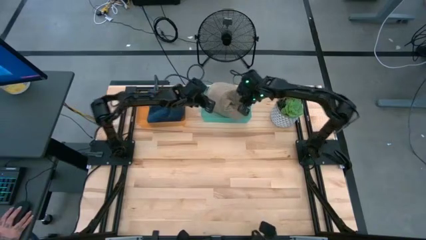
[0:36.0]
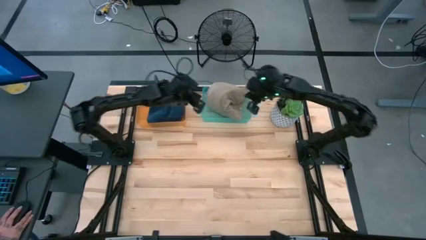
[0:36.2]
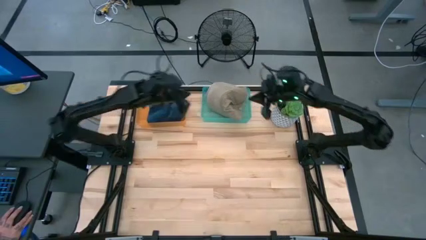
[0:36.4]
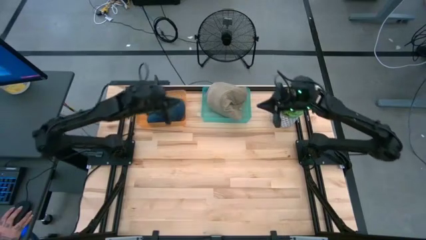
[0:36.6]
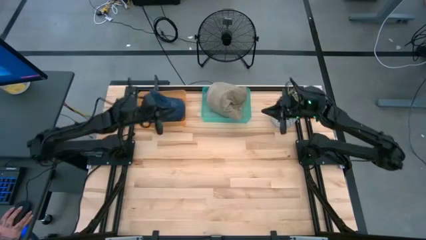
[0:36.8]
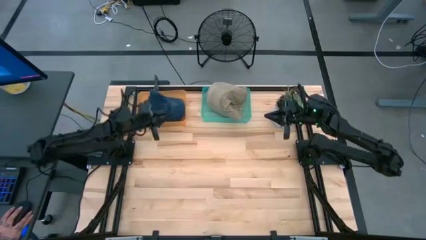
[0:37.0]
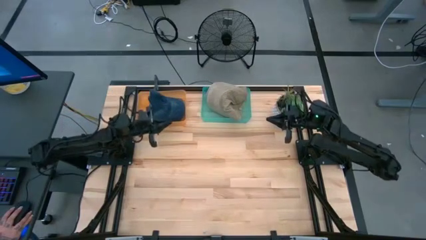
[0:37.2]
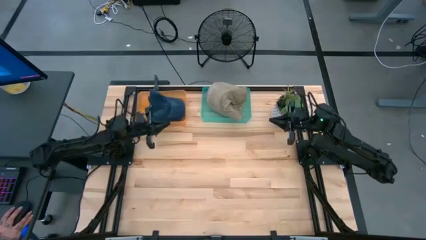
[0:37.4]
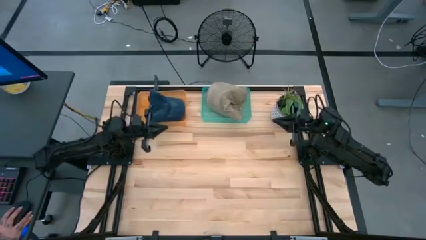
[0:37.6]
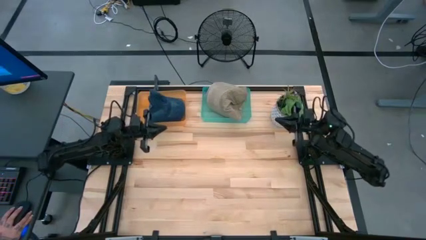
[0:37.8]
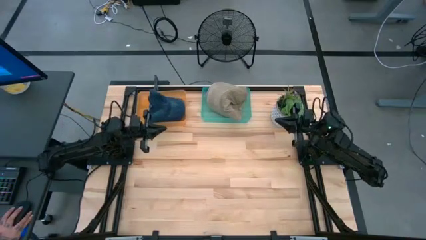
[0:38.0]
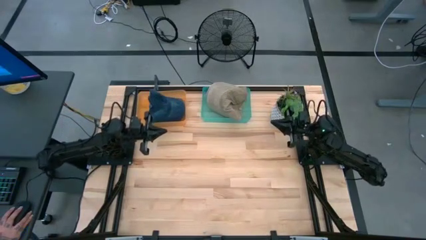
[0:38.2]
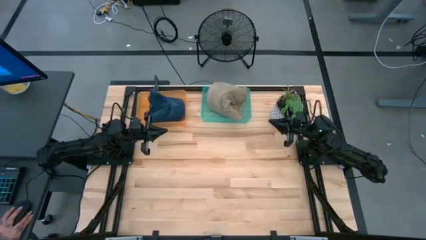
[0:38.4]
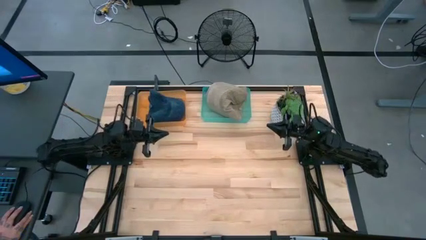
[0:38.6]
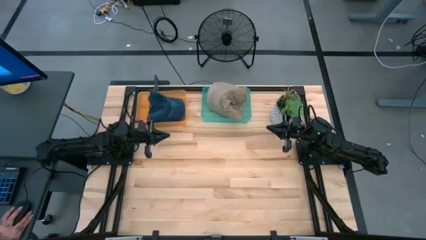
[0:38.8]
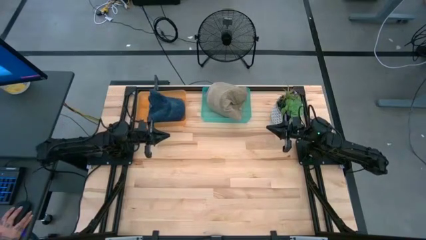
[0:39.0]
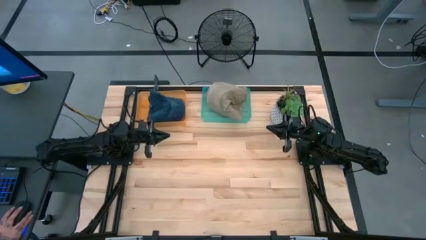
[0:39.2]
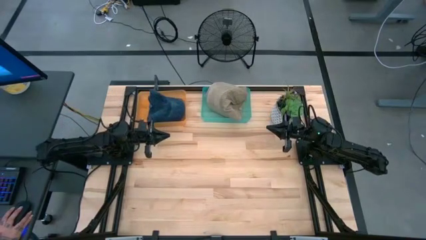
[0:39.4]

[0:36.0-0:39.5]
Task: Pick & Place hat
Return to Home Position

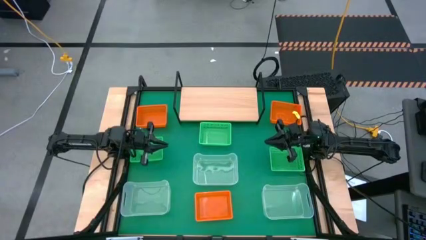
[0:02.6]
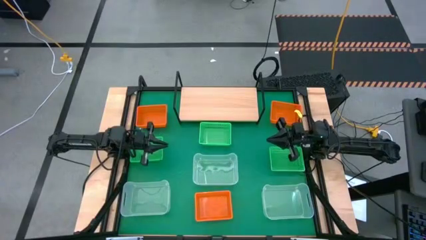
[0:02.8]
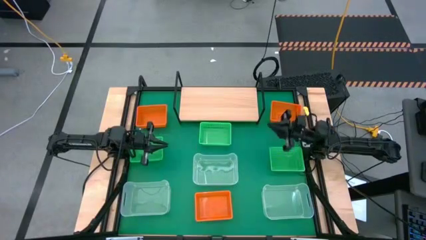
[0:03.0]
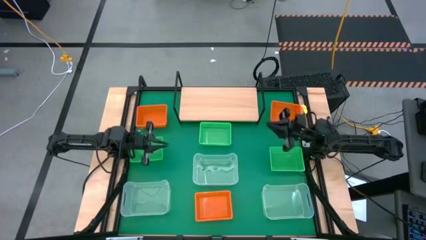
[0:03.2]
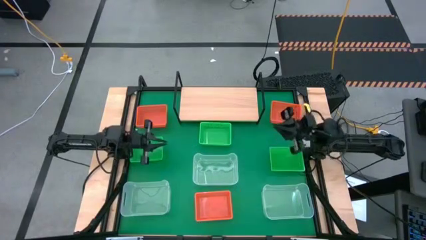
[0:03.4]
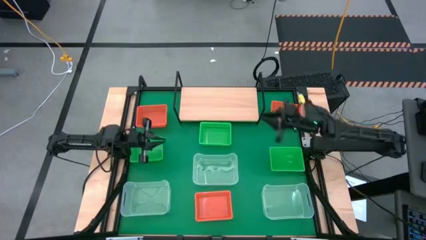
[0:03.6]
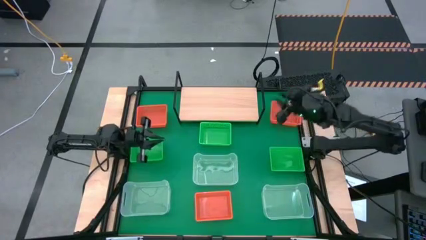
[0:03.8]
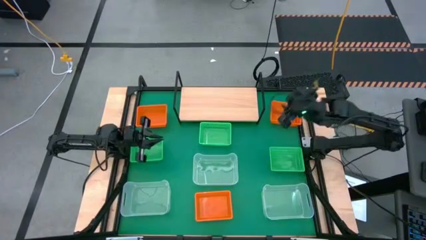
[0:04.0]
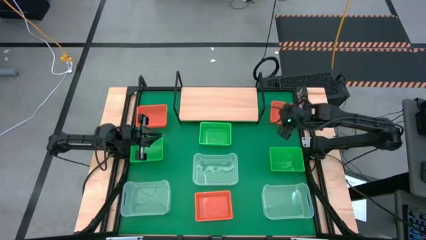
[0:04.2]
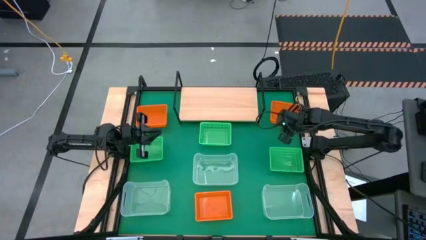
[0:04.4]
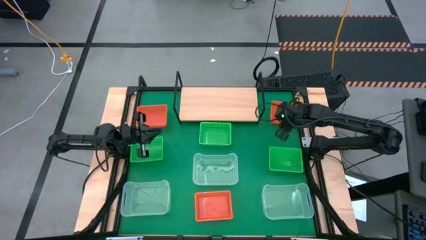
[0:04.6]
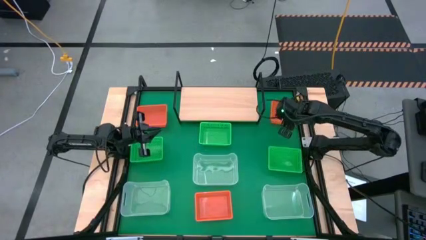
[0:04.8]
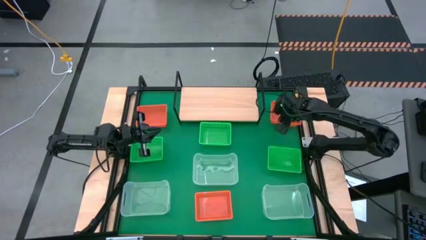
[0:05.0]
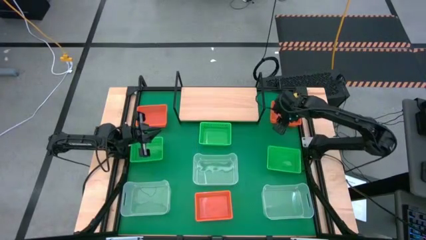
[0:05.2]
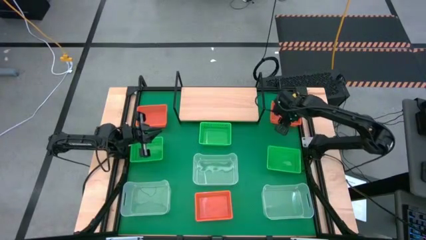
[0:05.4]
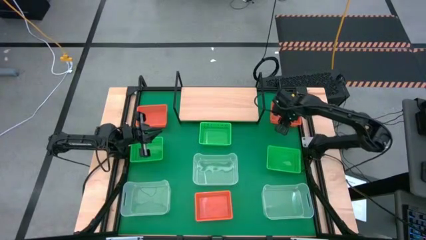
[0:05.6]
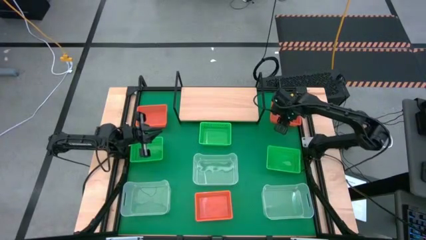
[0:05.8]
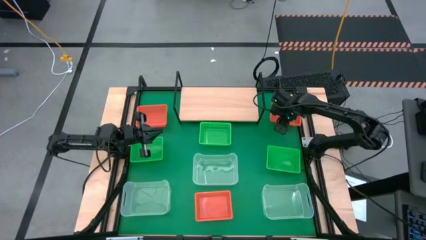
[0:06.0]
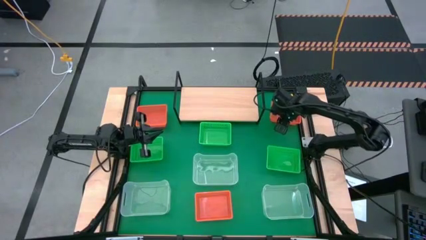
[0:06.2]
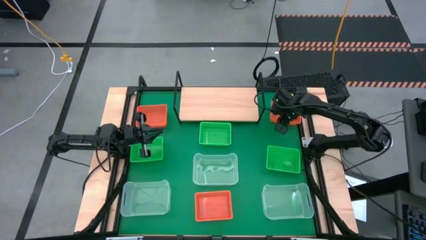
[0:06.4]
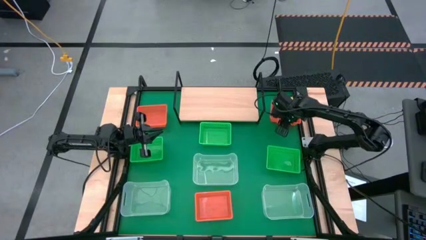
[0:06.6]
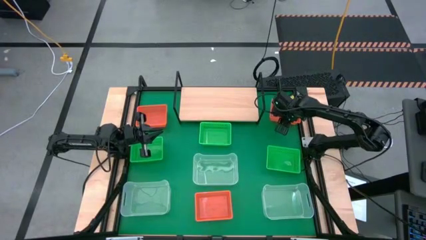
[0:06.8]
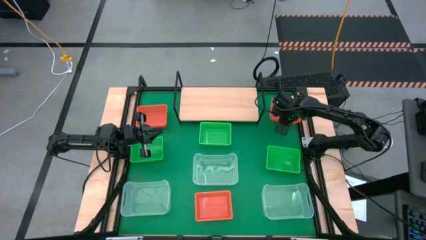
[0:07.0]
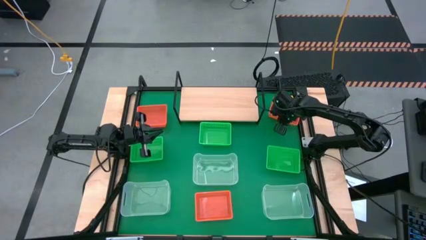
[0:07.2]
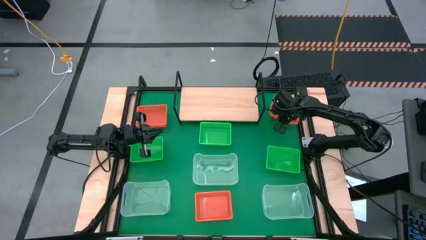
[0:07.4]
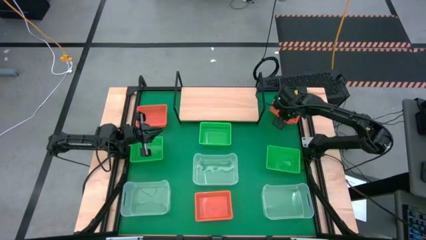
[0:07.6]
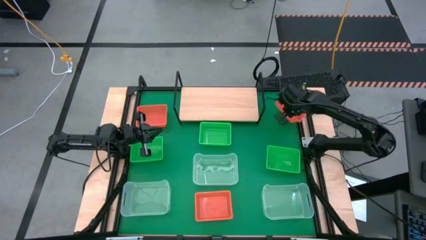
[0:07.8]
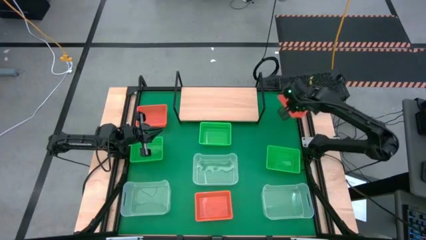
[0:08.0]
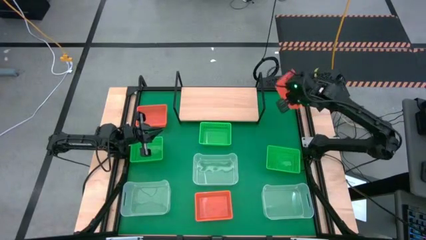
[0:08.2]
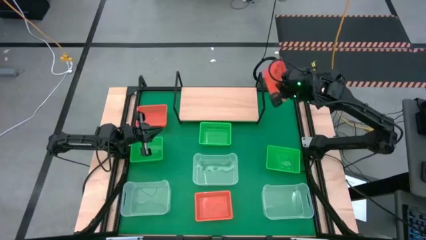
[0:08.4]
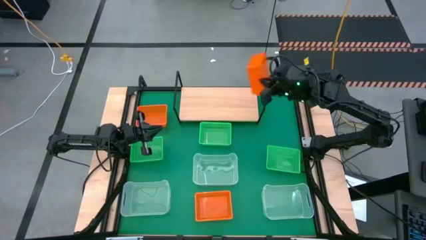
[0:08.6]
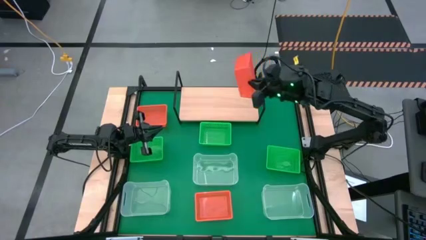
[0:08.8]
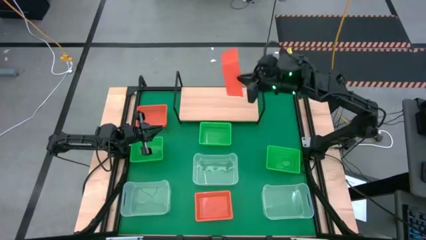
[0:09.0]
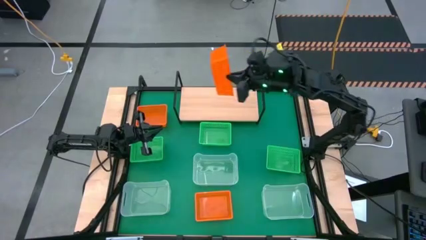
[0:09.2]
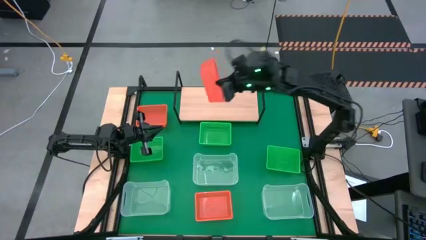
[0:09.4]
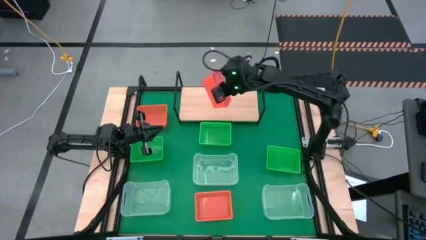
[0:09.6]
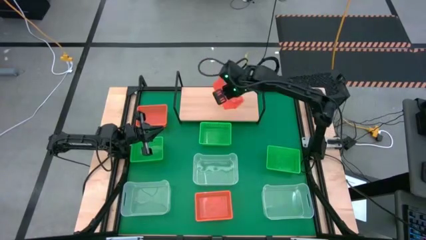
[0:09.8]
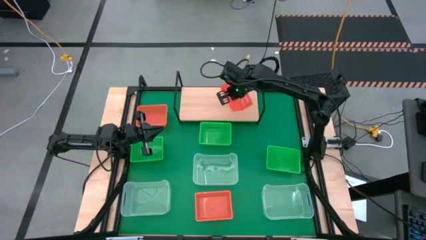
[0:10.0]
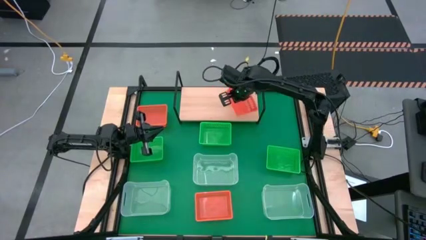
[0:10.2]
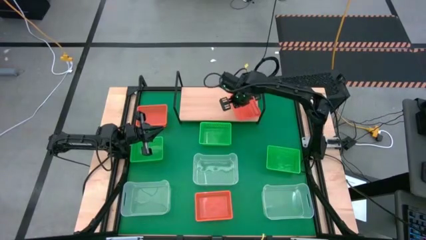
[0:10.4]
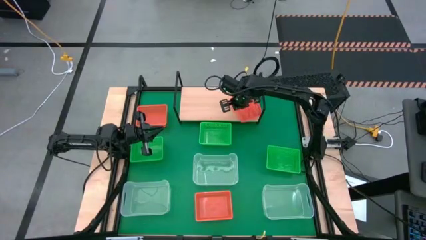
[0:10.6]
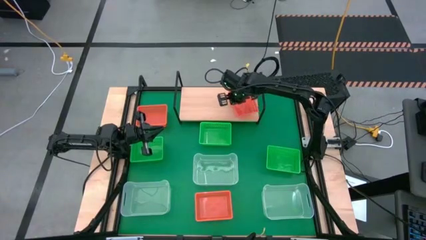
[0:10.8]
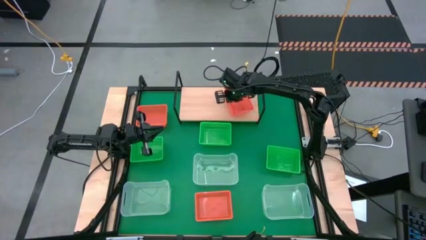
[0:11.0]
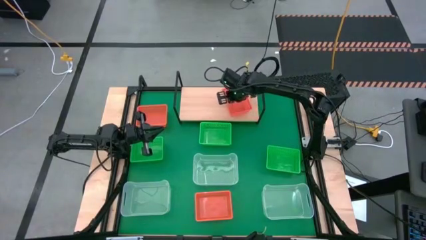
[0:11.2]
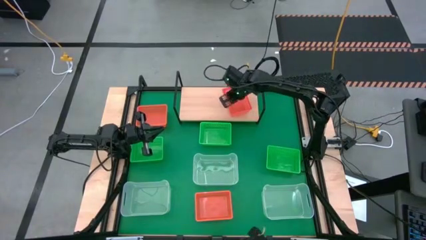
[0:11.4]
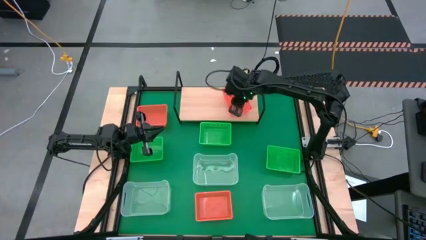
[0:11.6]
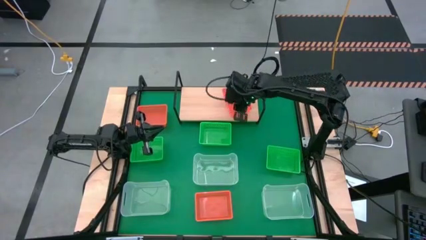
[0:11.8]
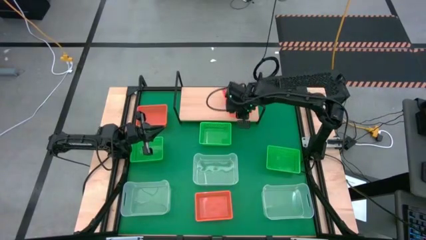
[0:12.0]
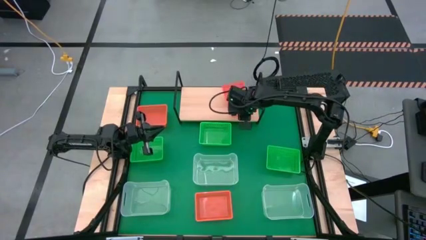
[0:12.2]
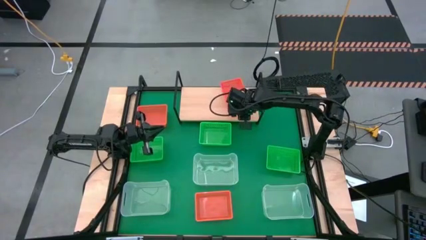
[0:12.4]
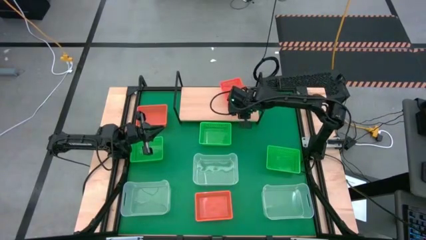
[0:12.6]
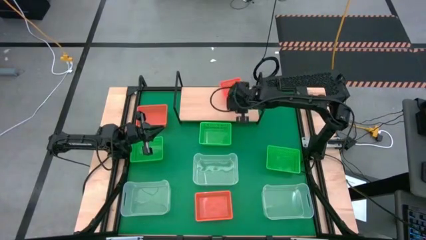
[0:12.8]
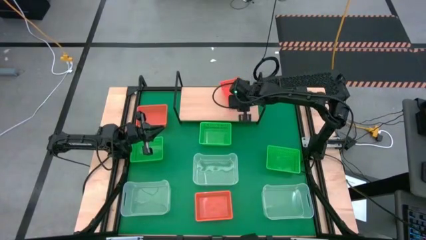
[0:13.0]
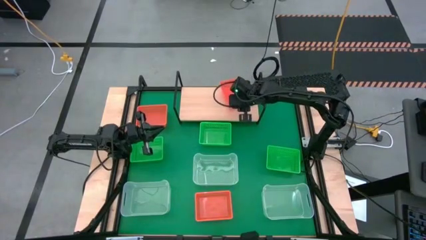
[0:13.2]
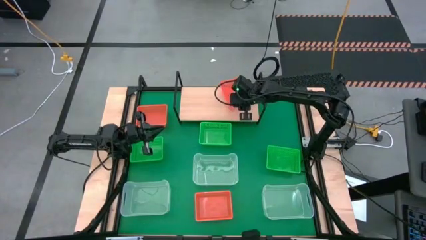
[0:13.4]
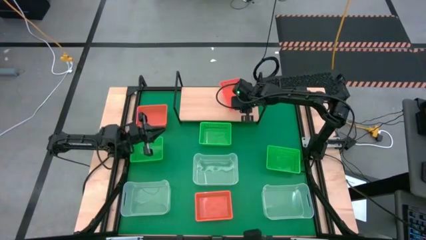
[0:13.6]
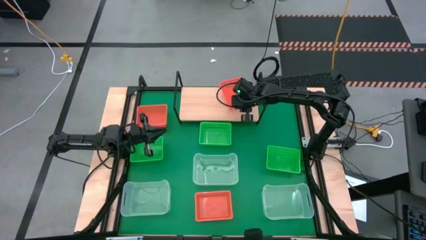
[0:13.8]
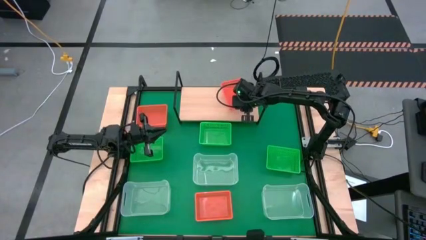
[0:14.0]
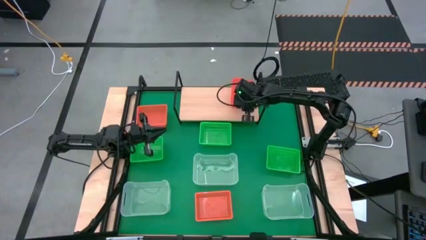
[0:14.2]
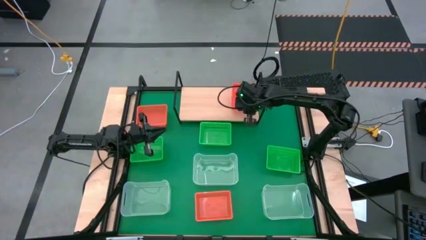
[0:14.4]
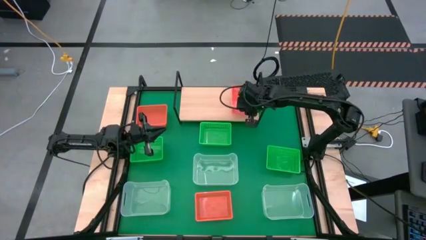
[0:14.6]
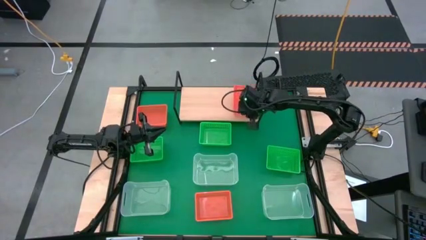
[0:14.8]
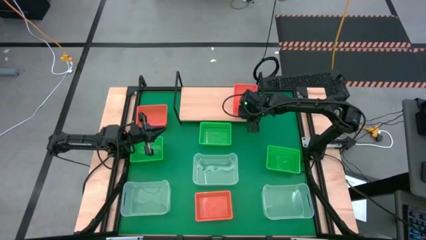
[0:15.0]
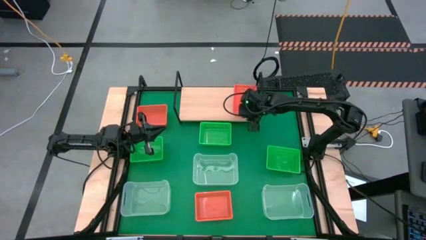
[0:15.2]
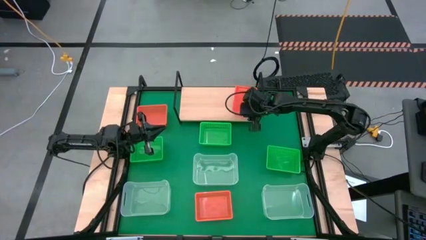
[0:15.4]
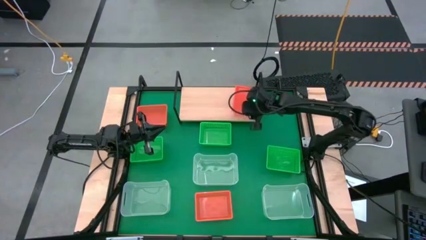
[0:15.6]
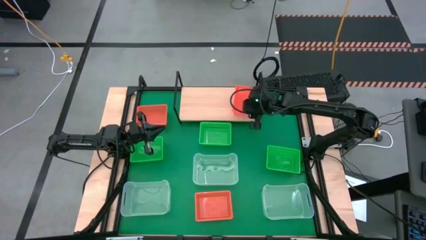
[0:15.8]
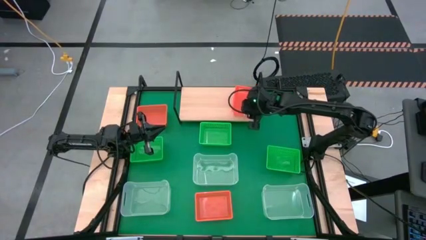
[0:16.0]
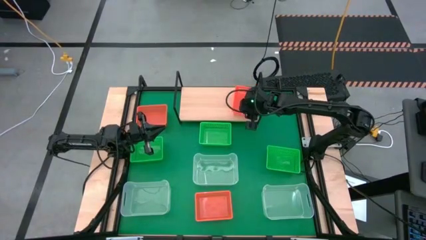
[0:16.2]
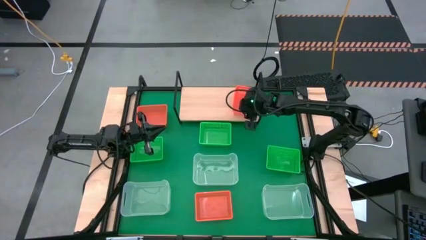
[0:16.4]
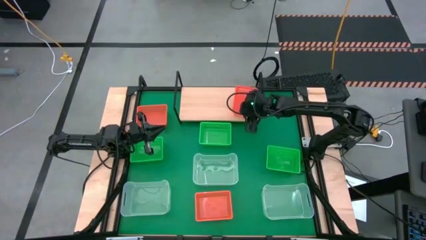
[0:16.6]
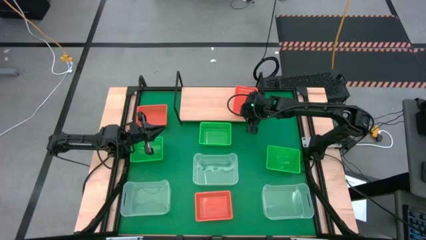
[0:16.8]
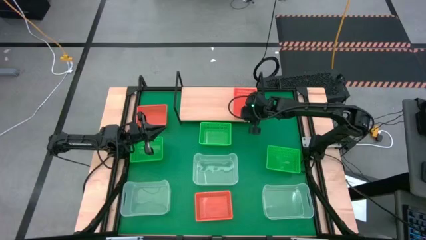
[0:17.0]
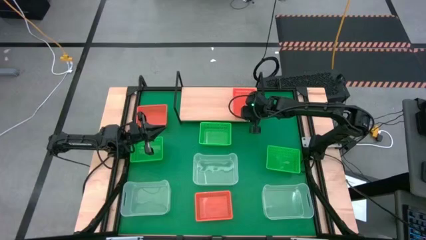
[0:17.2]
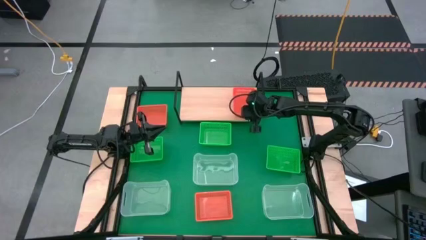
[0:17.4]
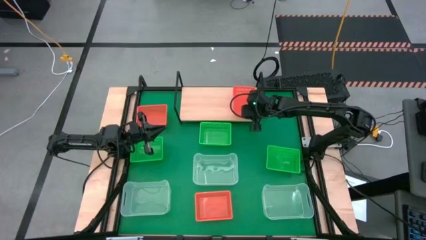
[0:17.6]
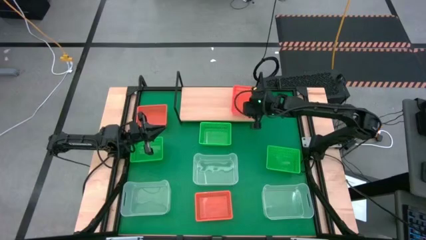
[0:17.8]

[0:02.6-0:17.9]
Task: Stack baskets on shelf by color
Put the top right orange bin on the shelf
